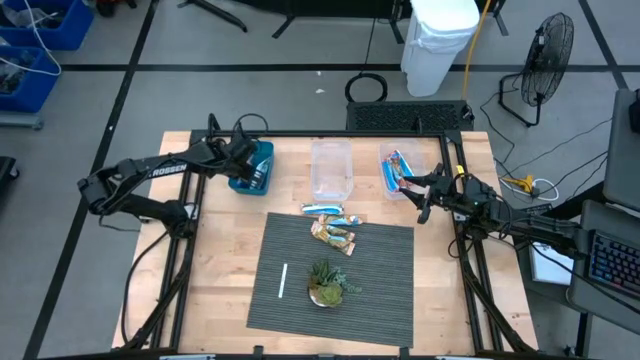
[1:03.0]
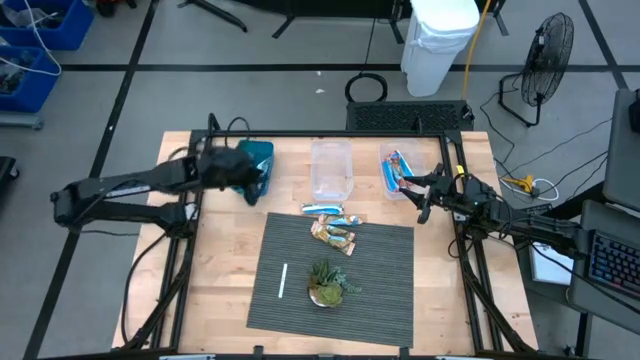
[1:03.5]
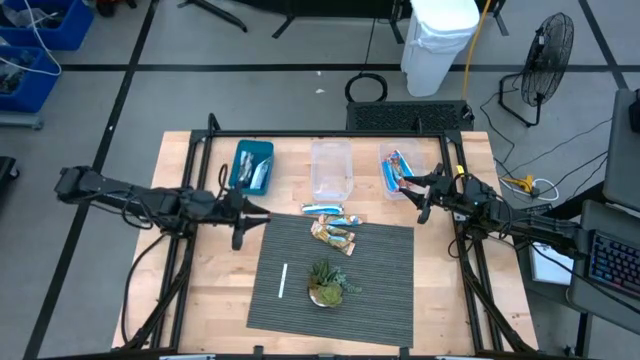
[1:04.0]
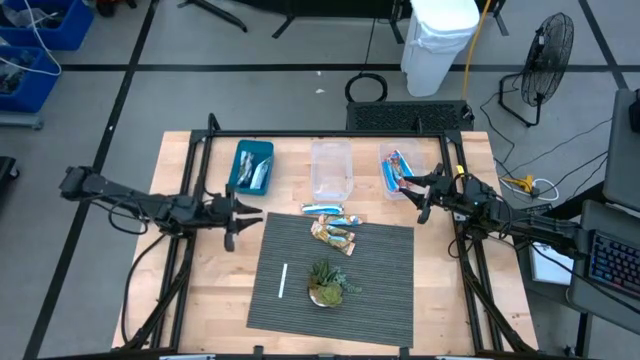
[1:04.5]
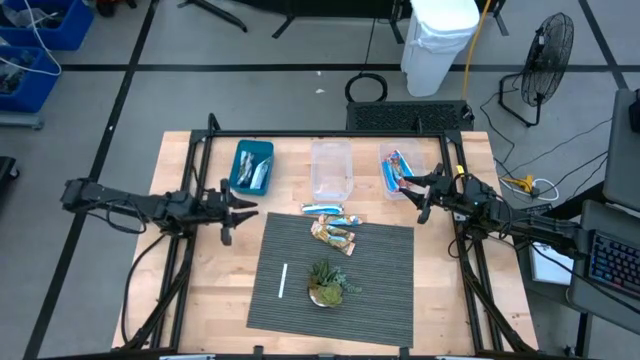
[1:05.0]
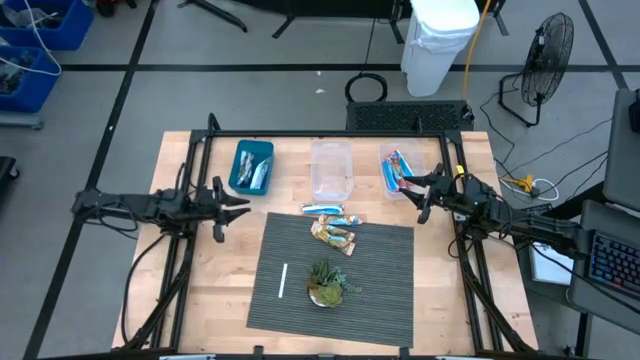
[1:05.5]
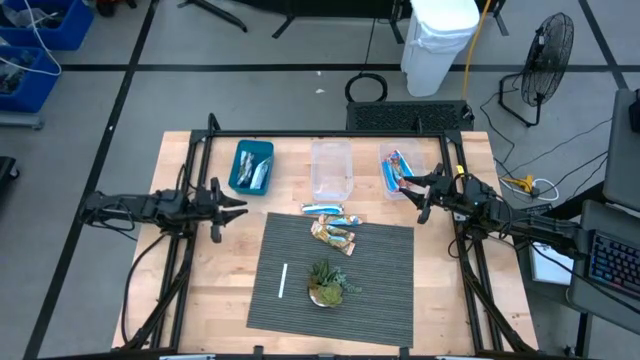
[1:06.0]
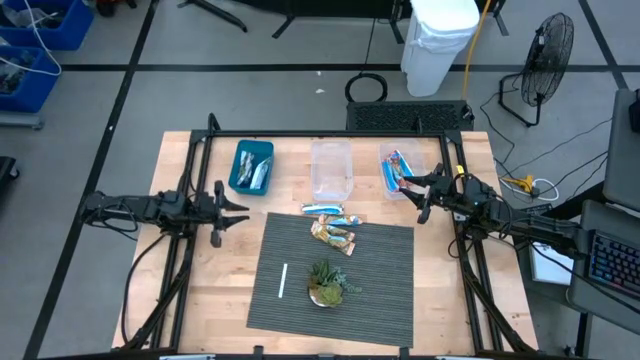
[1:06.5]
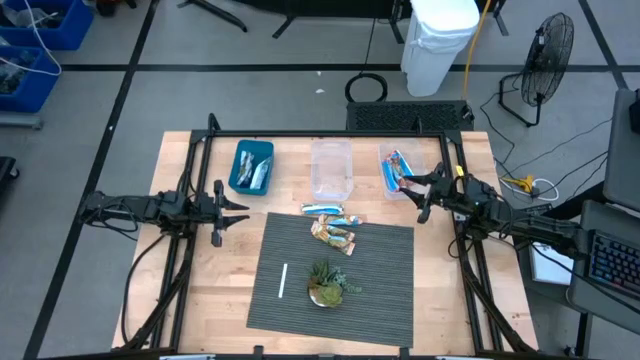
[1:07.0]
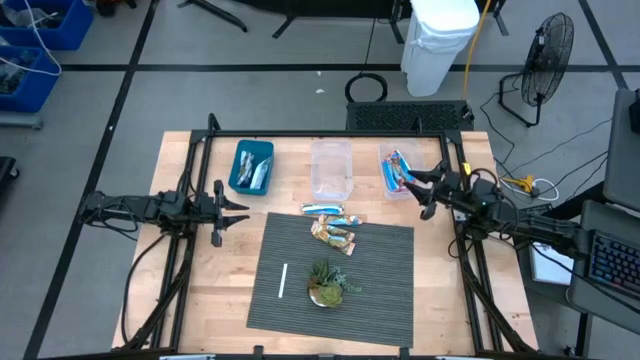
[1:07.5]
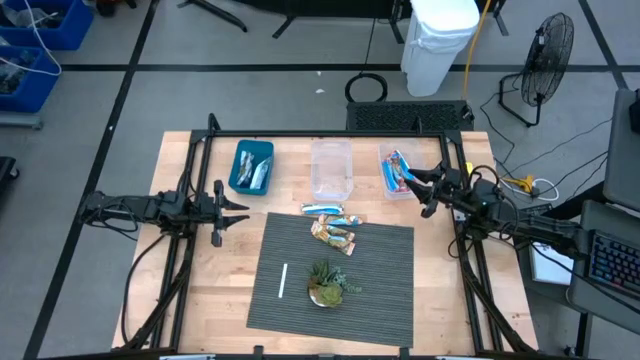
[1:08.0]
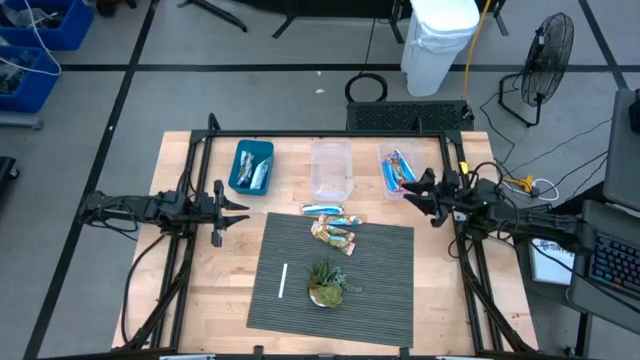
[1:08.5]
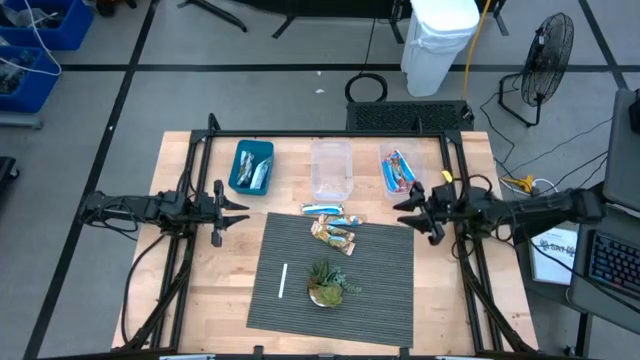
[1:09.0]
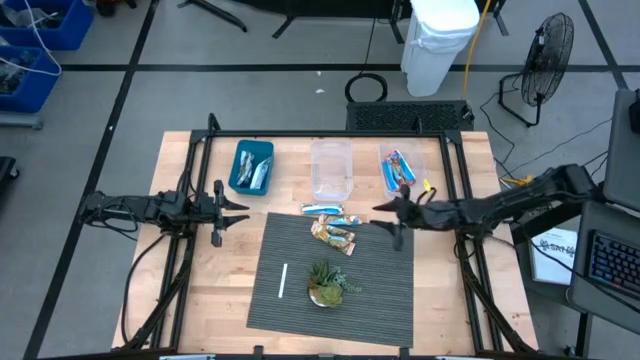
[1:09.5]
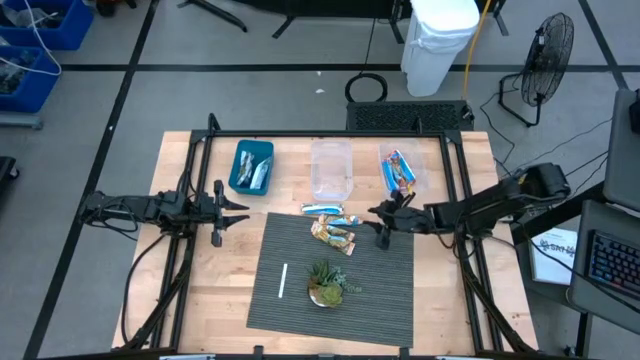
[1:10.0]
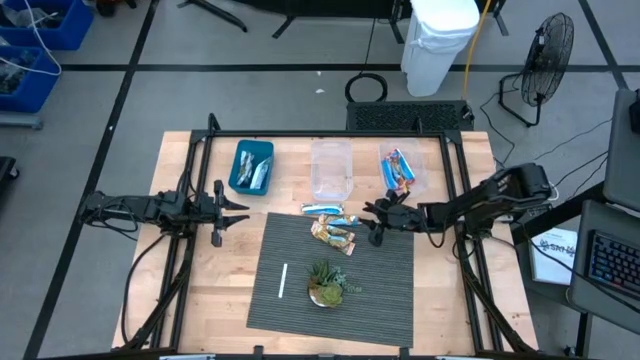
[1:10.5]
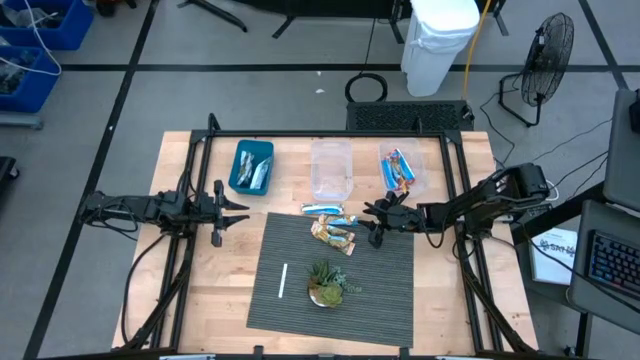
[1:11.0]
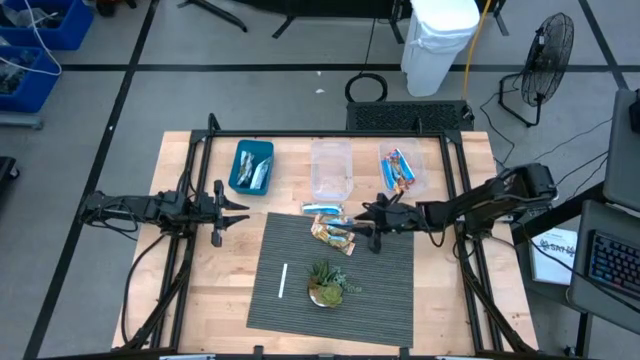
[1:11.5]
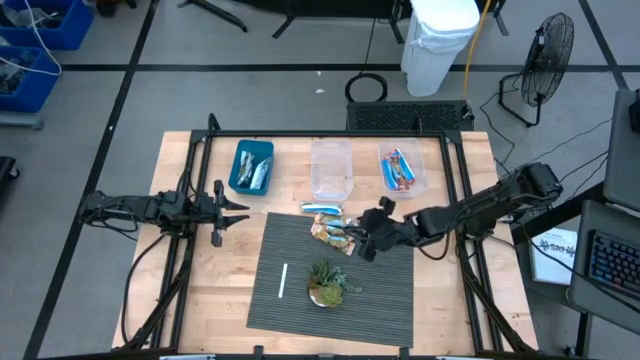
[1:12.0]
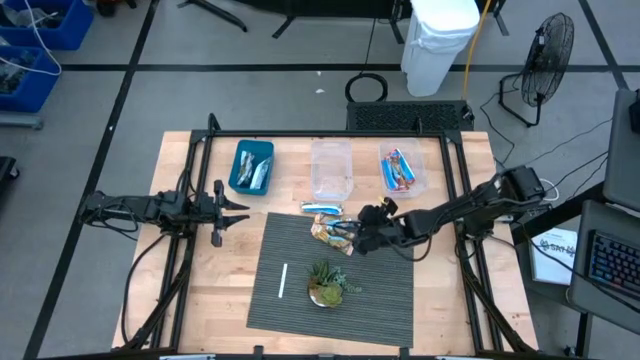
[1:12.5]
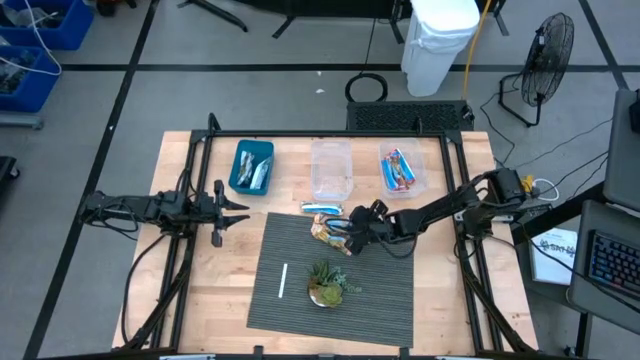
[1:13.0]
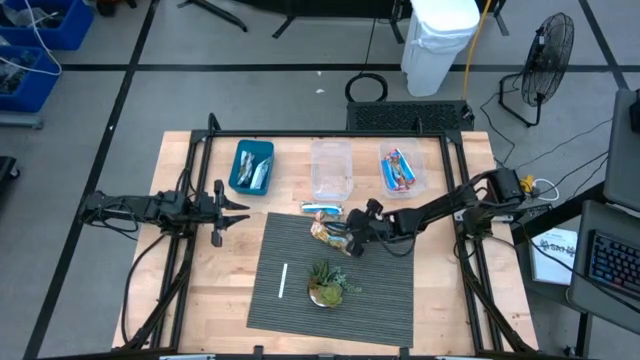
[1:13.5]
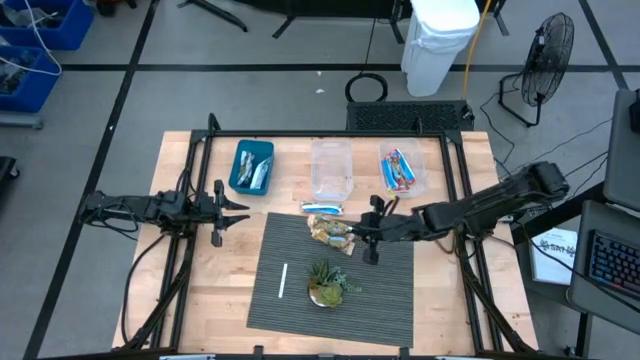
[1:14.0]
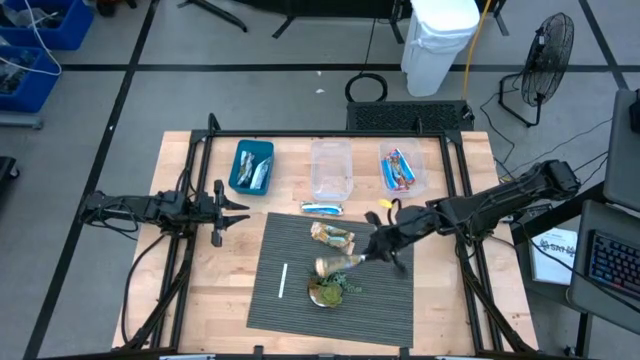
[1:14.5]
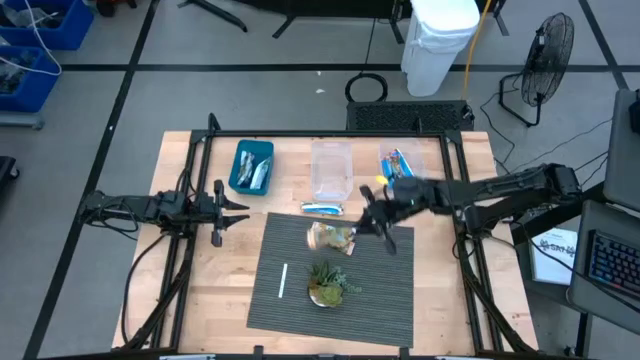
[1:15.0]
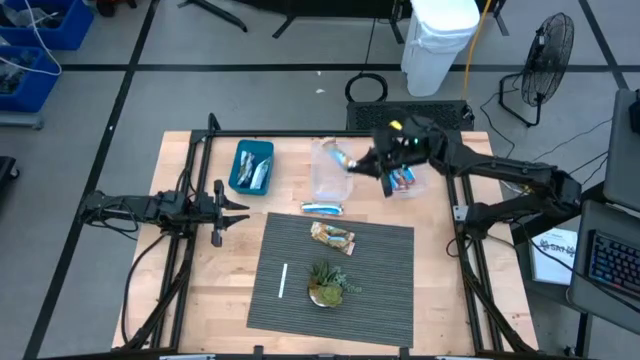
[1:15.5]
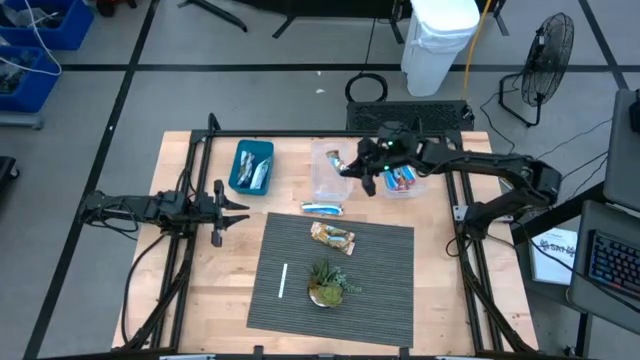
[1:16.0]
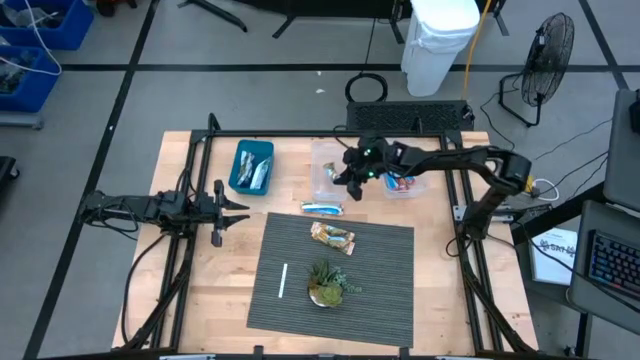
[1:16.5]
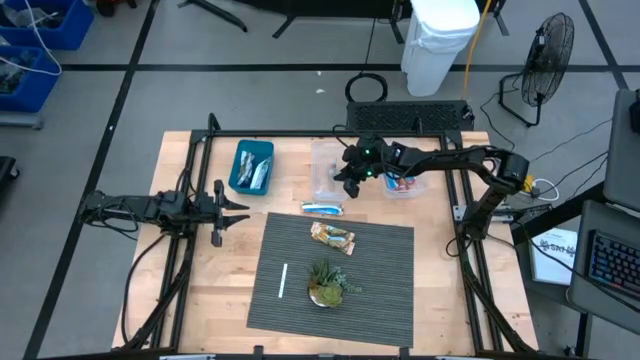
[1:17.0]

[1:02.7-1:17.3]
Task: Pick and place Granola Bars by type
Put the yellow granola bar into the left transparent bin

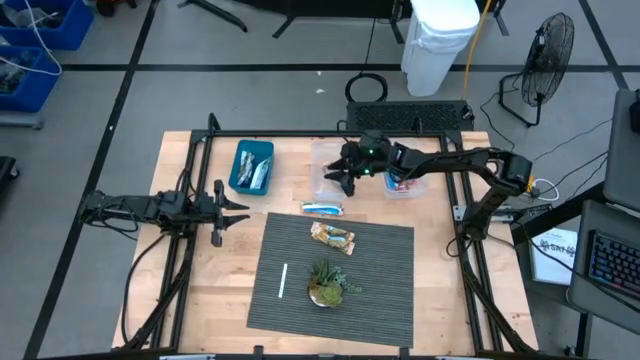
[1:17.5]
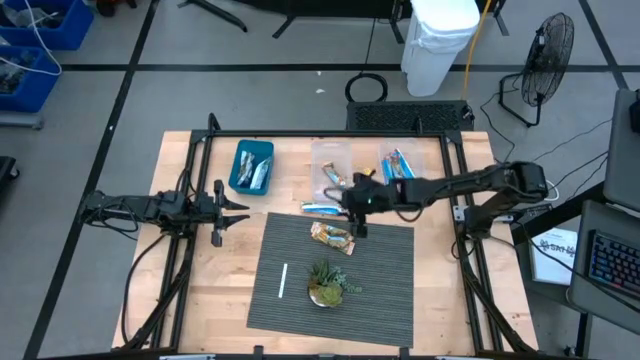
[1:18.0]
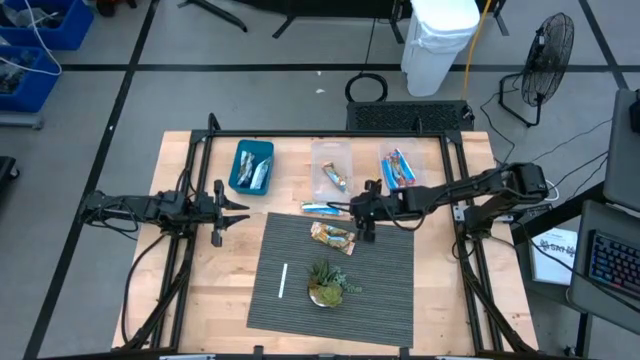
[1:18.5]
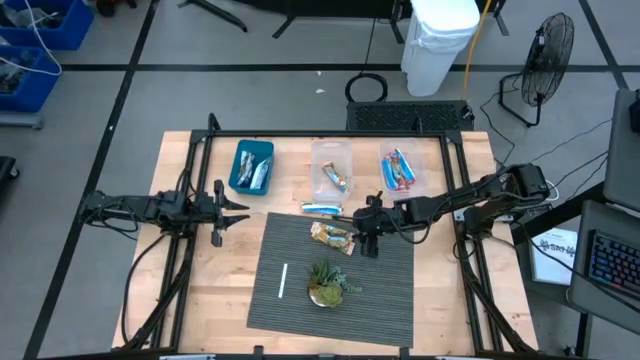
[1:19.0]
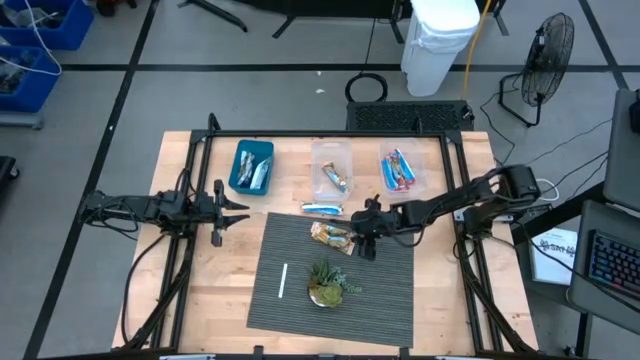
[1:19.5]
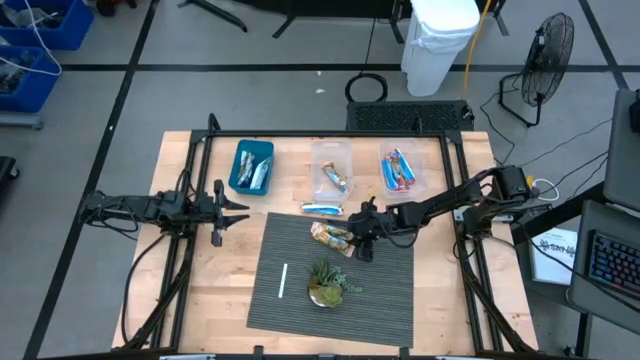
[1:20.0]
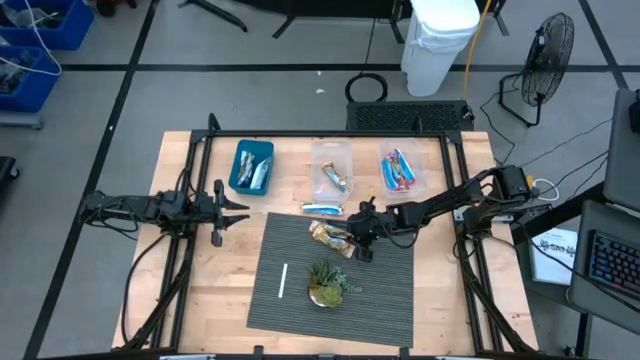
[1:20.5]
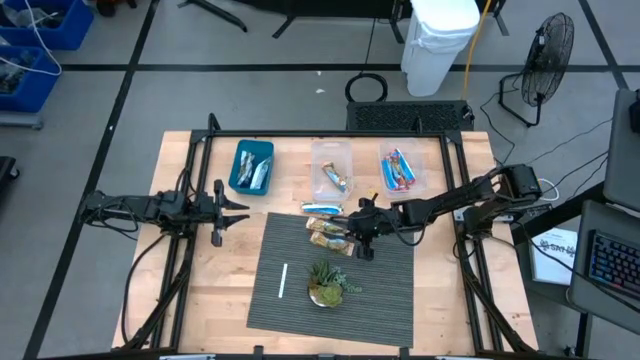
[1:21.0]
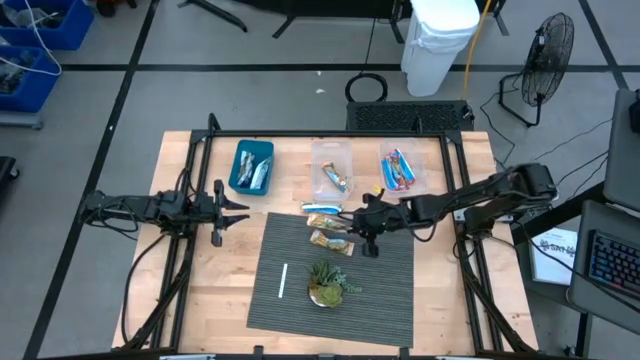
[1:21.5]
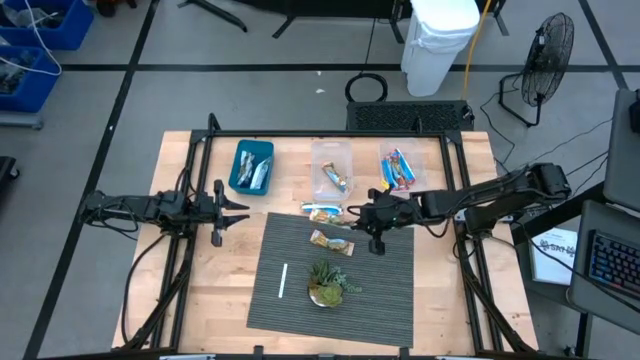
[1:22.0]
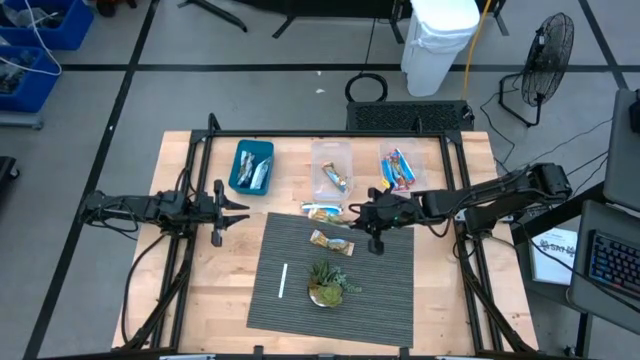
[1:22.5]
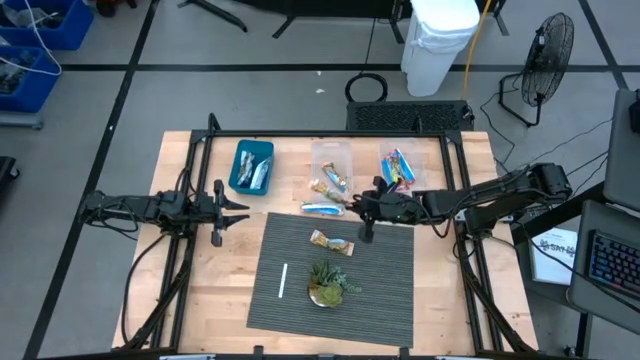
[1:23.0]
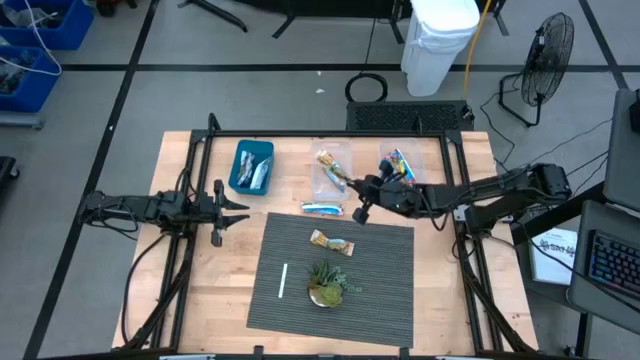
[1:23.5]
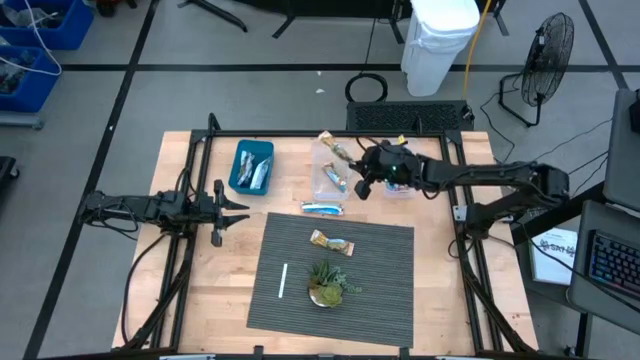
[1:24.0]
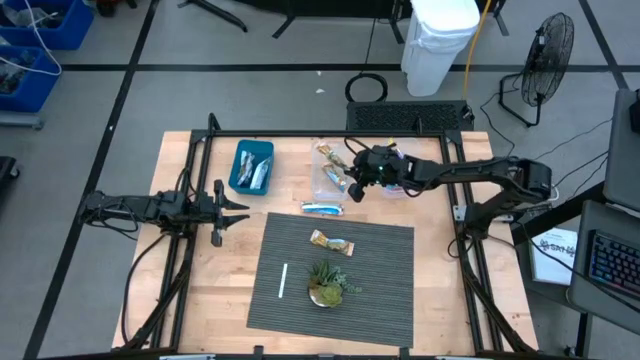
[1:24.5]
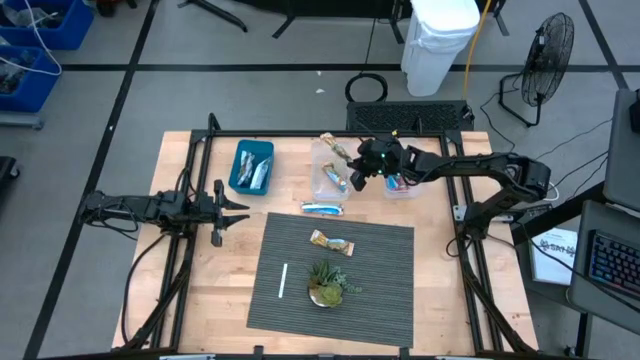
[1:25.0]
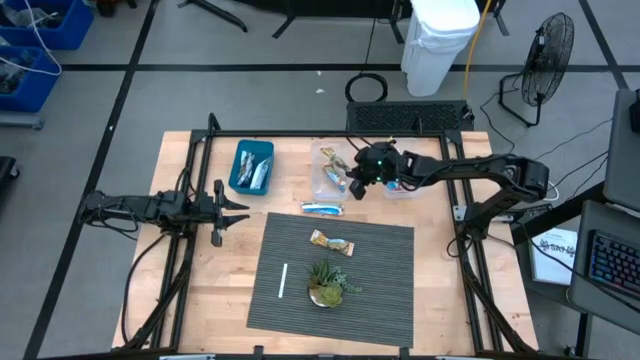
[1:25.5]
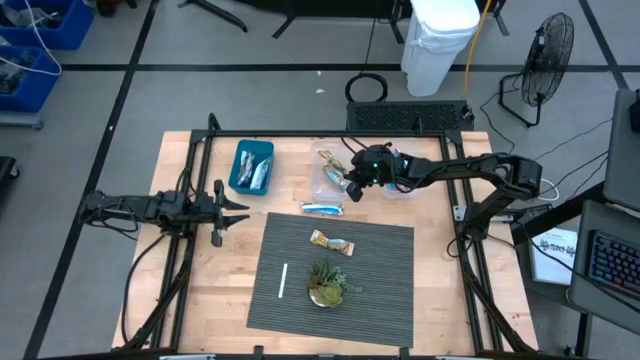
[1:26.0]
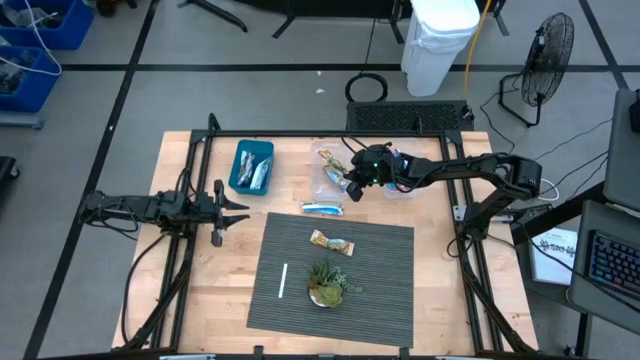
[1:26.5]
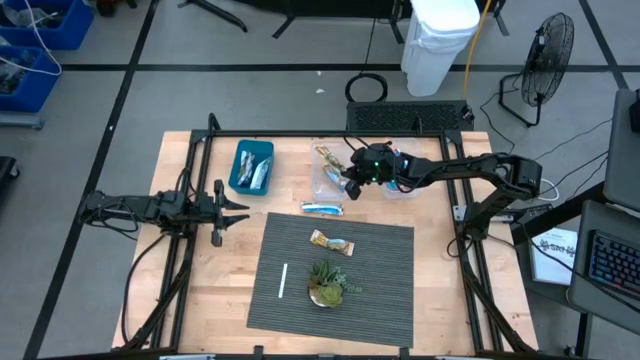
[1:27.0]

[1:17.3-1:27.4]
Put the yellow granola bar into the left transparent bin
